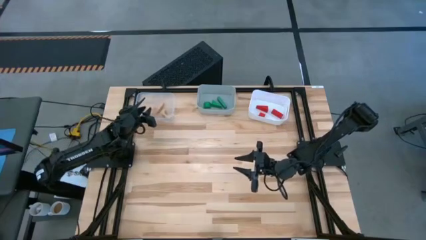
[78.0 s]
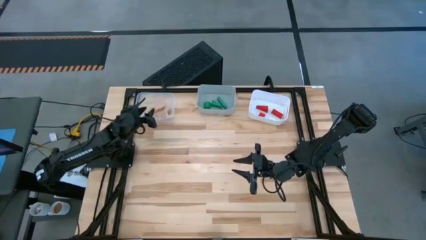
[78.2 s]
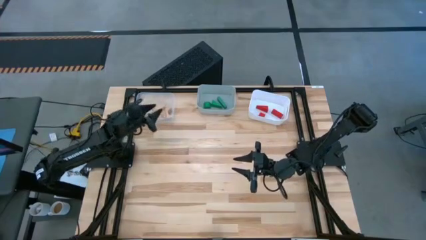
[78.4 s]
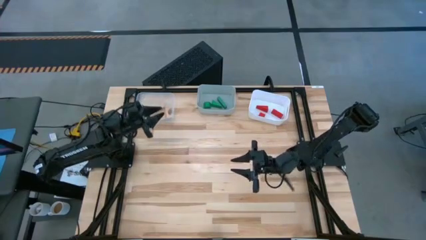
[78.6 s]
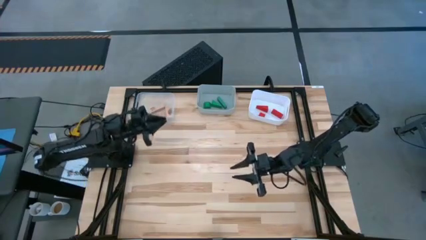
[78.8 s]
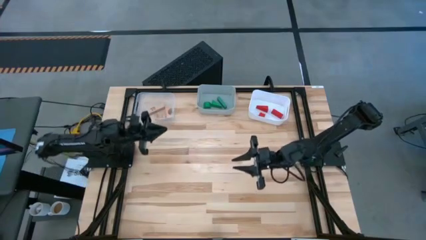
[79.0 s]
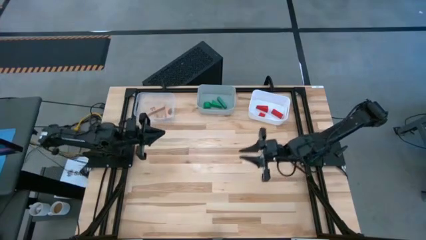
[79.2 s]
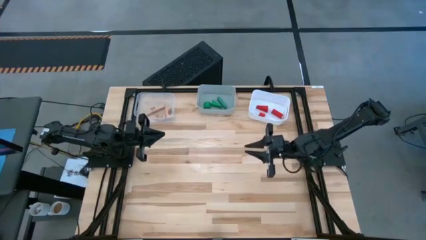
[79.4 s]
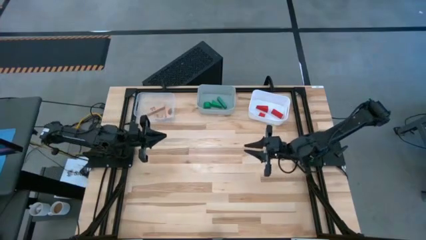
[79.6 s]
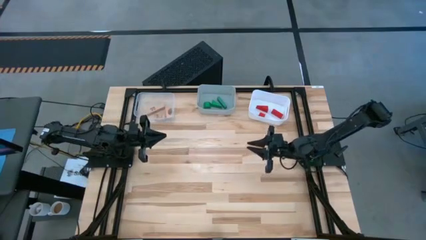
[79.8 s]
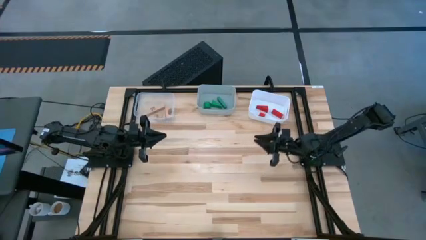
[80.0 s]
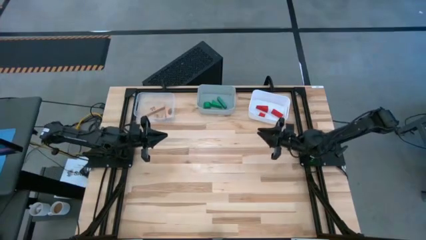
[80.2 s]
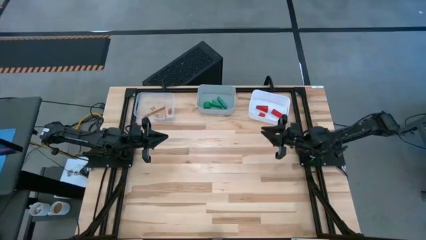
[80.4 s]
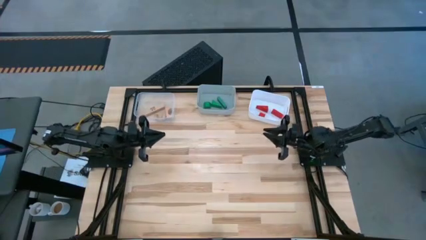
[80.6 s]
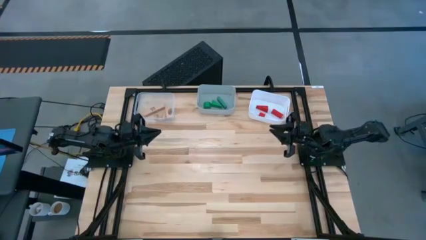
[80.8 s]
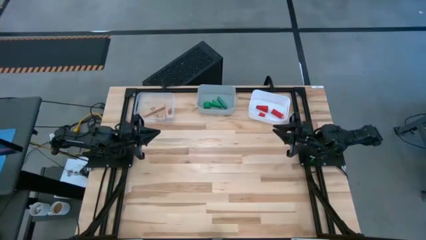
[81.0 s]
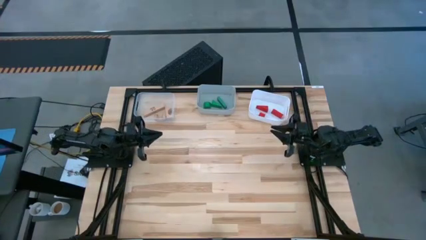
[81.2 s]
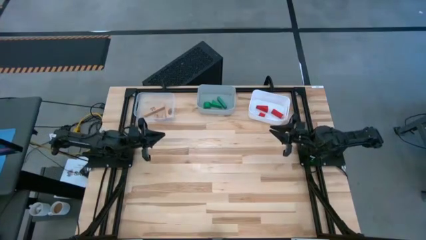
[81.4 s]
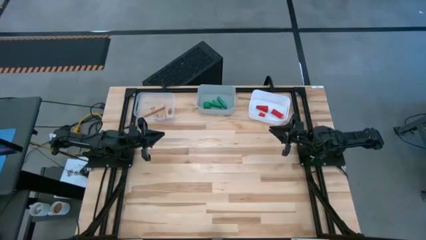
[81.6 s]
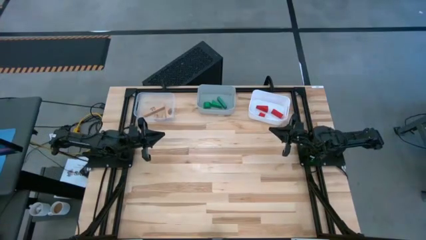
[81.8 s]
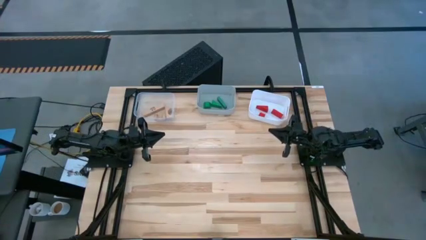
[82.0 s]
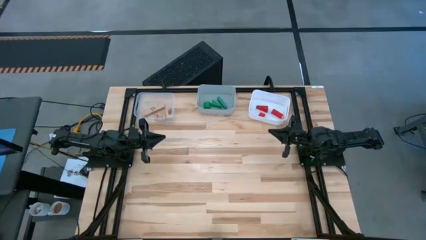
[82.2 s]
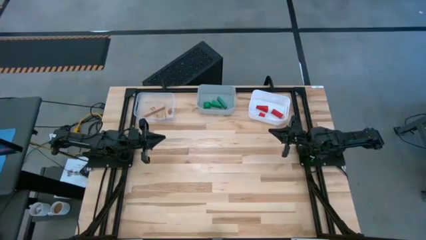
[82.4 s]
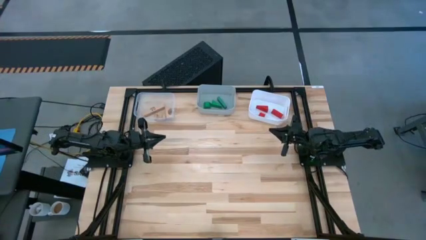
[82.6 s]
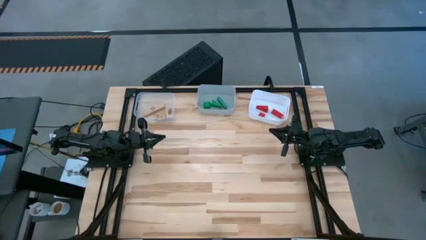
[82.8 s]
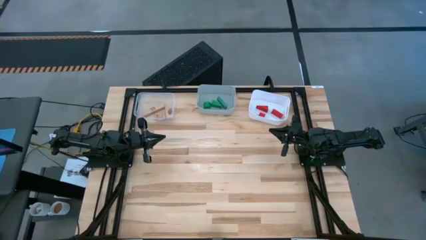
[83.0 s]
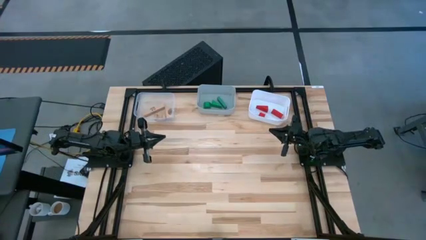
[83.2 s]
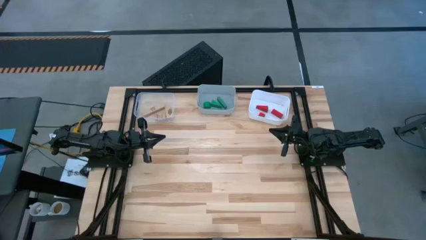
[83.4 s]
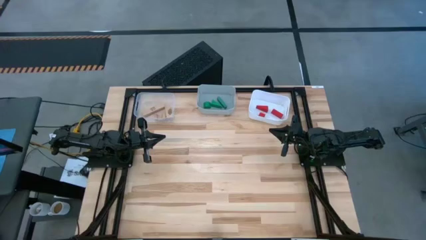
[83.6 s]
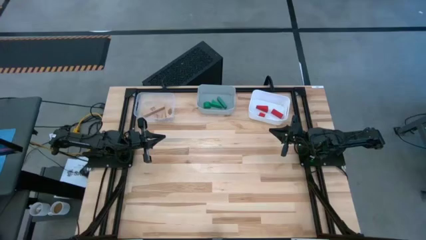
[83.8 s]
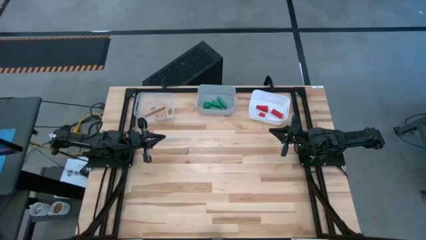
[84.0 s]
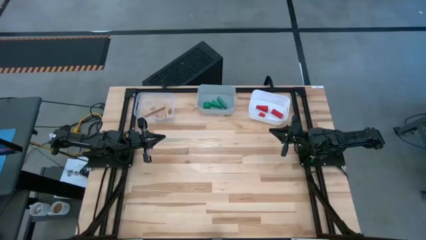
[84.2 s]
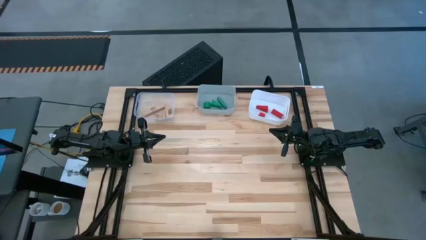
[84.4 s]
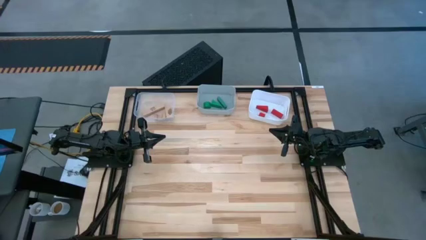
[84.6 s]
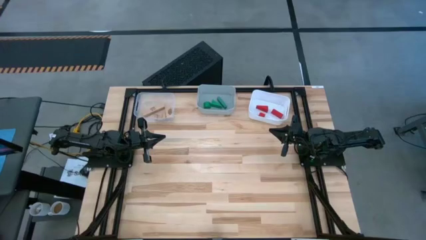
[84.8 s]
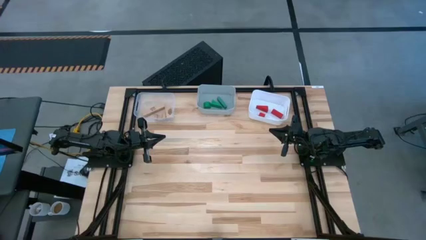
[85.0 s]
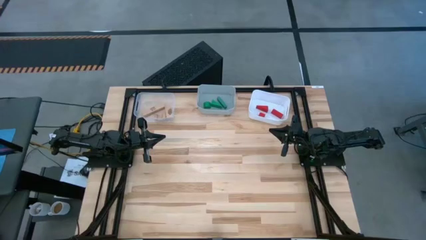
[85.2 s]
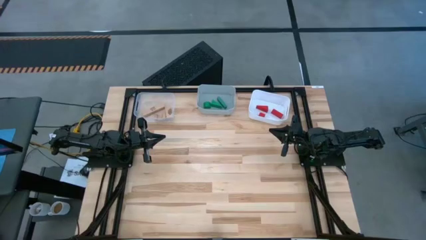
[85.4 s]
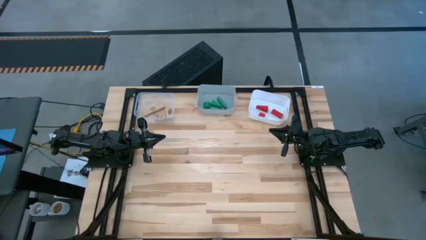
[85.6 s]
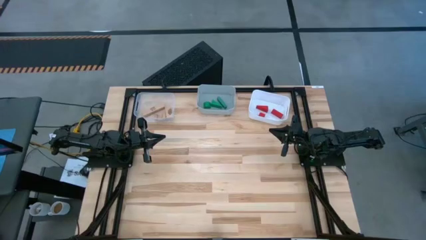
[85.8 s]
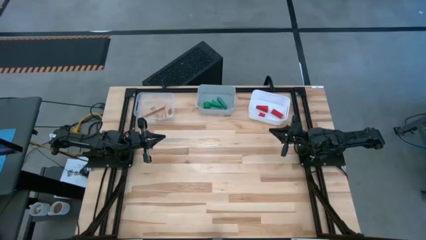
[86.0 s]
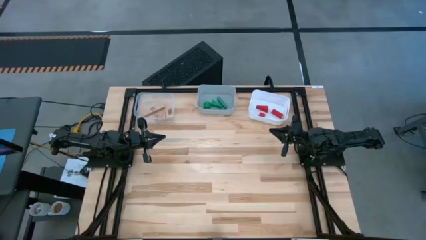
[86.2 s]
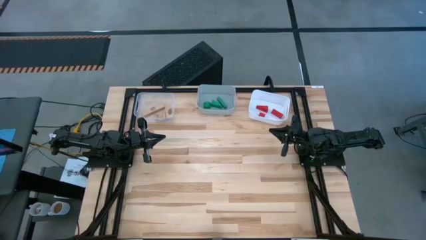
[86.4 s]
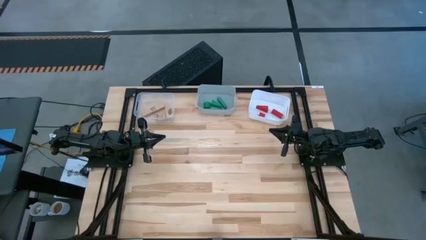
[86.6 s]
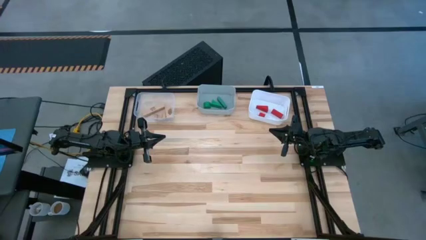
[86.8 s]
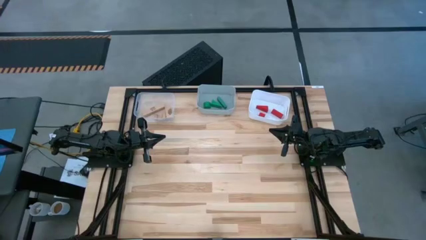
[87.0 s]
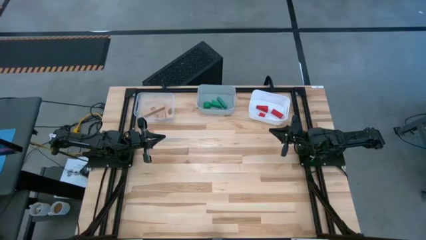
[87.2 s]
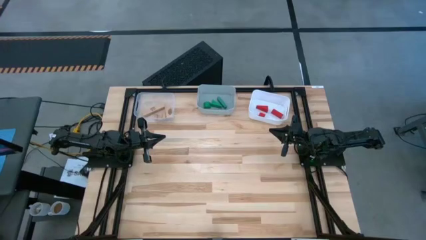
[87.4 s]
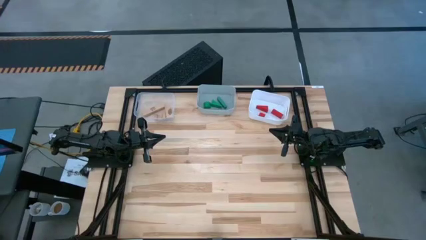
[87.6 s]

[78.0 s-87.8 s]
Task: Sort & place blocks by color
Return to Home Position

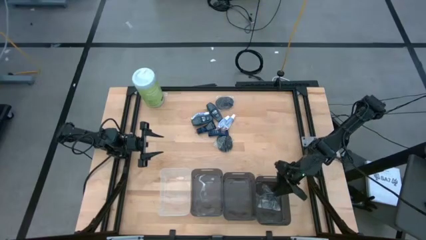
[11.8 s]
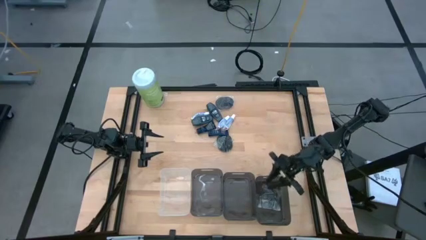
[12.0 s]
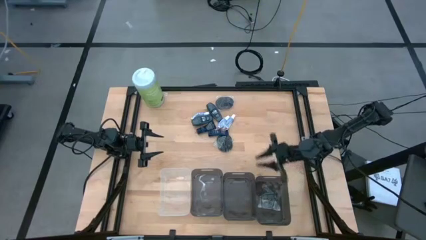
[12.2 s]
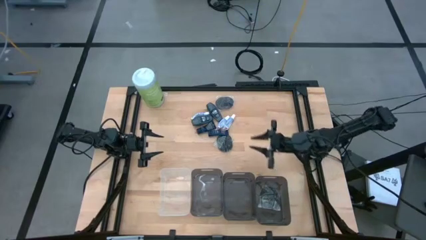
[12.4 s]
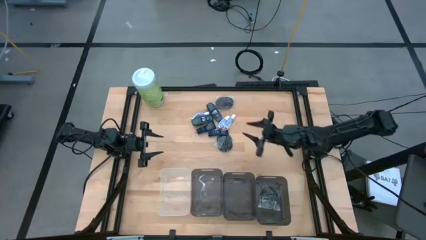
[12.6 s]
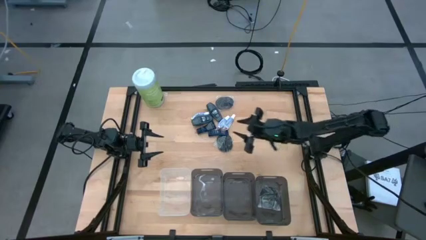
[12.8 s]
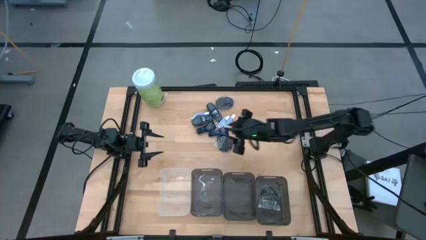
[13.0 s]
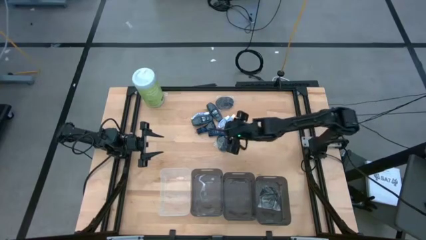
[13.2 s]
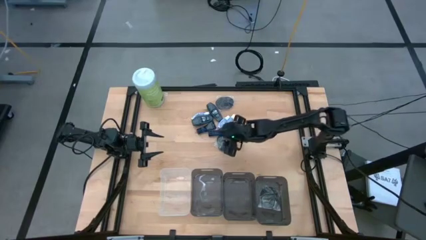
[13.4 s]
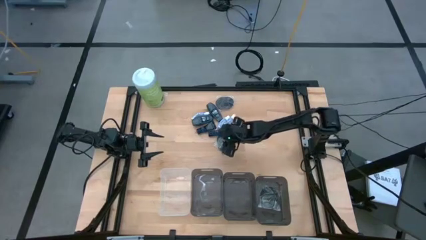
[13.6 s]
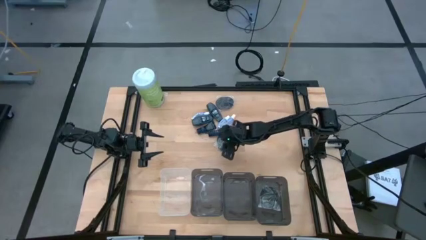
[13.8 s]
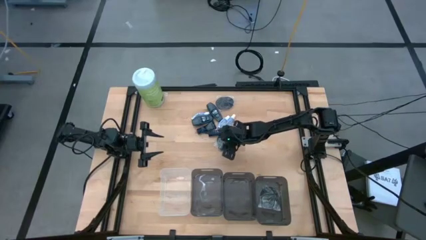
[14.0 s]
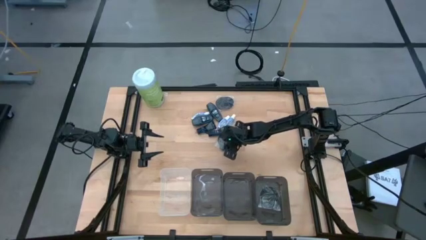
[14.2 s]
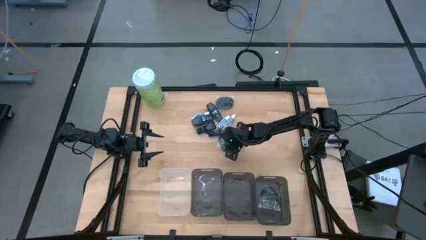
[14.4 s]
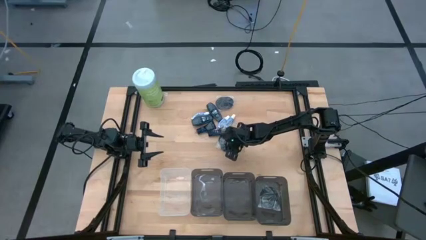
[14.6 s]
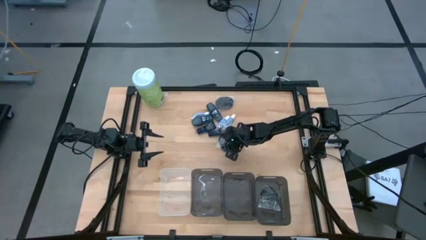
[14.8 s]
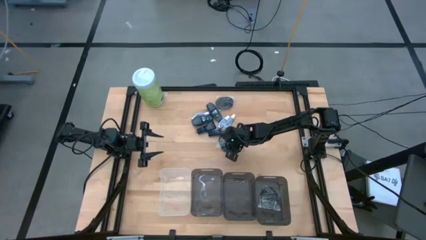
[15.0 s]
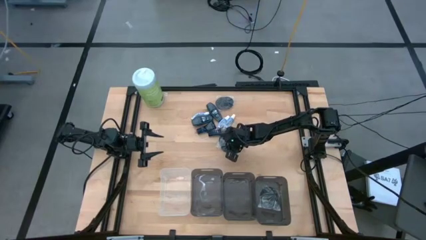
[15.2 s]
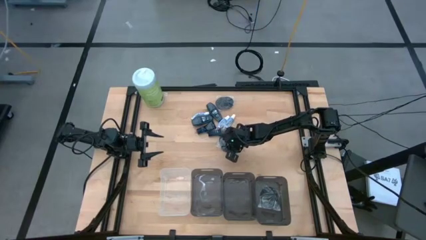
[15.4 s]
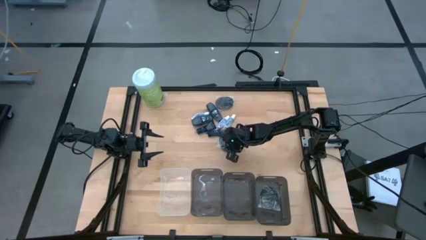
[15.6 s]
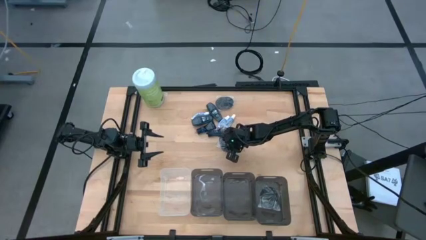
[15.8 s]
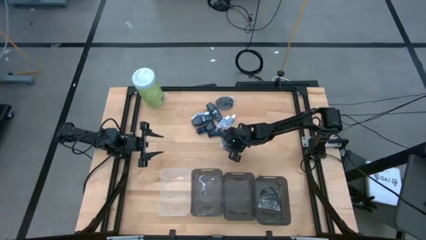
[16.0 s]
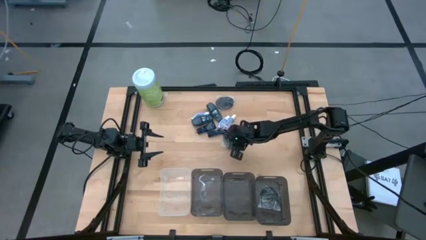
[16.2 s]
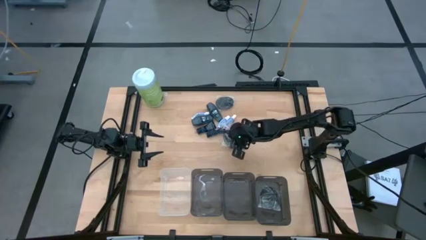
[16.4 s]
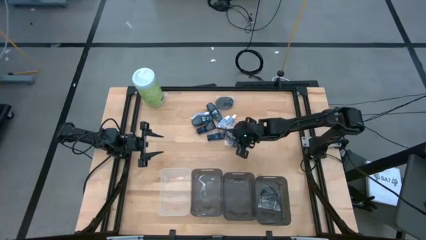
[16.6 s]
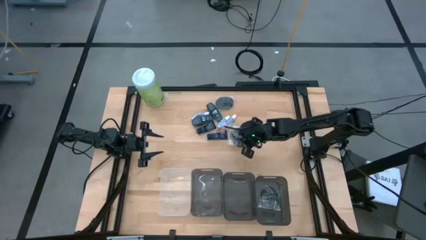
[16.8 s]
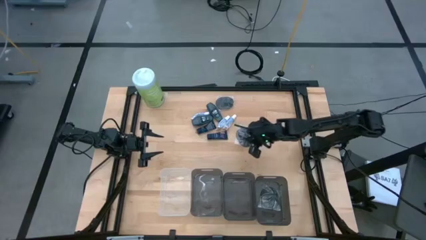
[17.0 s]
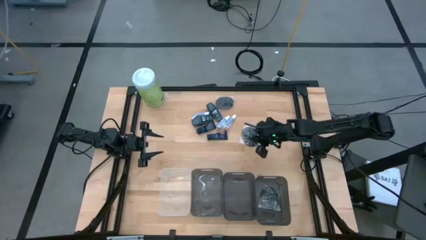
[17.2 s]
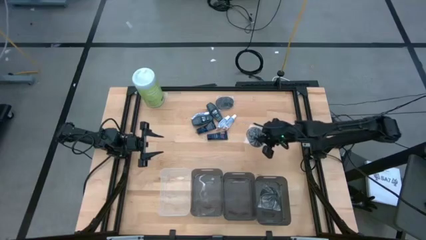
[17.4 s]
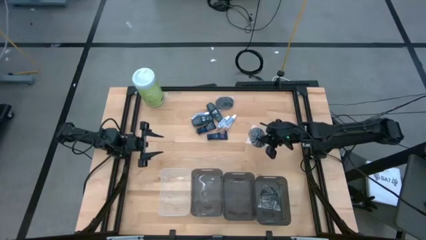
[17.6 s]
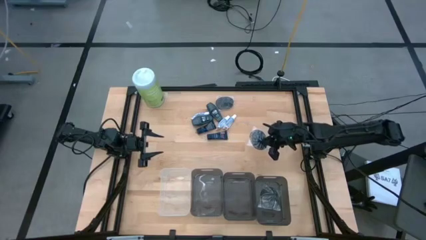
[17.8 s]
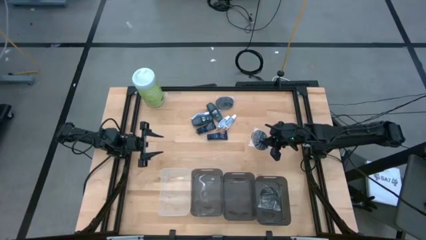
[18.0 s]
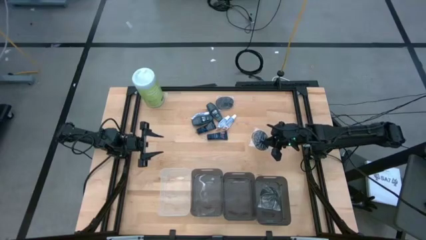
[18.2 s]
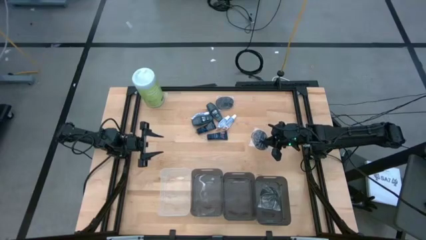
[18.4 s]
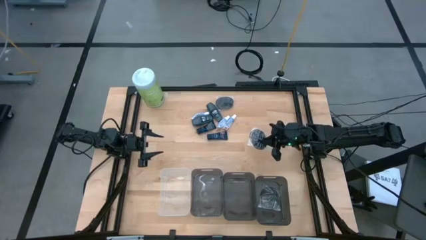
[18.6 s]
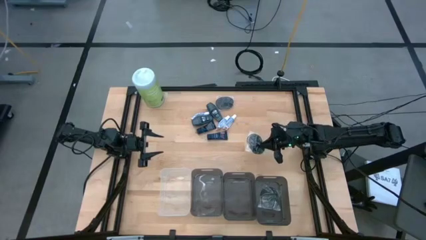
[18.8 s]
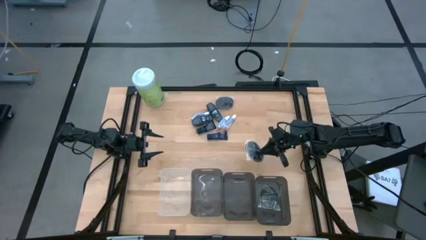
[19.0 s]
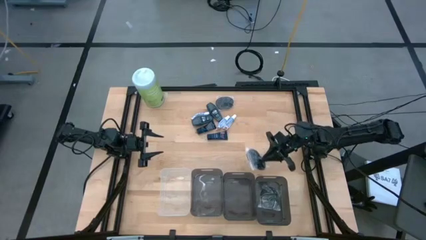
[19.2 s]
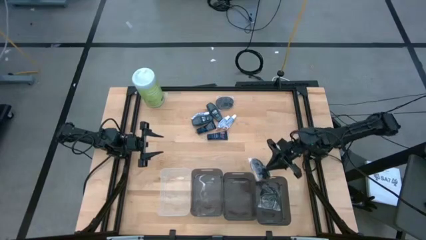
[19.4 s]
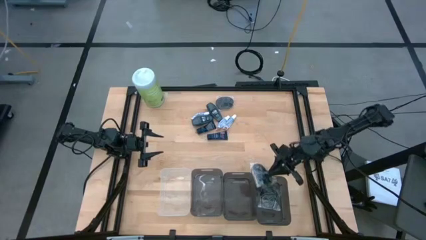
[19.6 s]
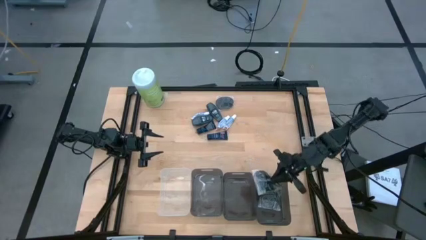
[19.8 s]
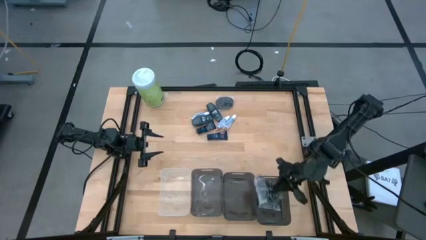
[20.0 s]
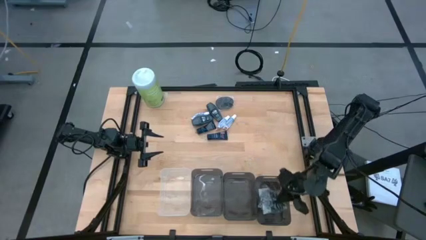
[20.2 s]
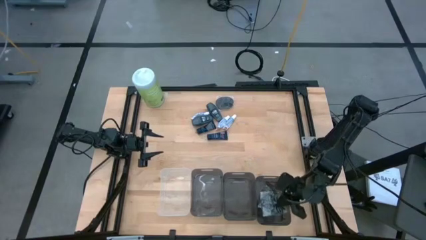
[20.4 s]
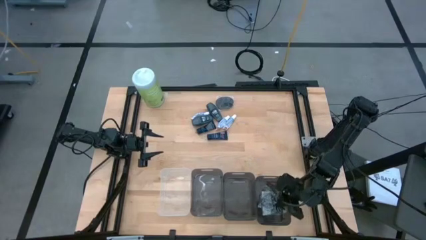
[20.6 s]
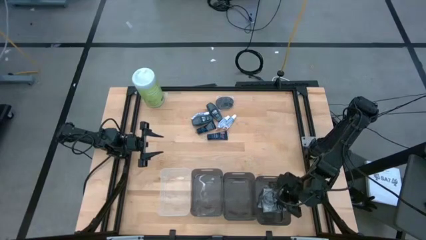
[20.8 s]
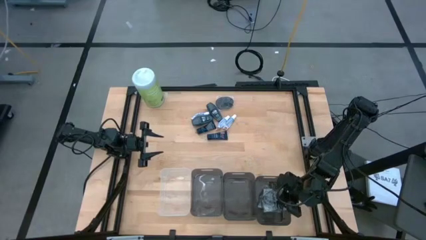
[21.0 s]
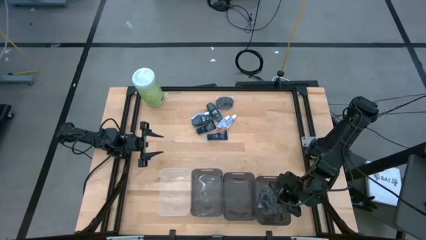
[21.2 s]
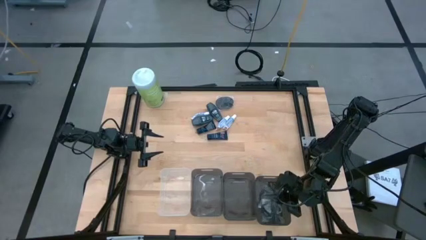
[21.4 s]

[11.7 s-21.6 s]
Task: Pick & Place Travel size toiletries
Put the bottom black hairbrush into the right black bin
